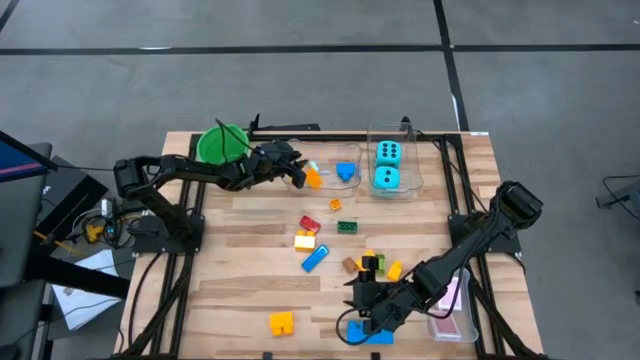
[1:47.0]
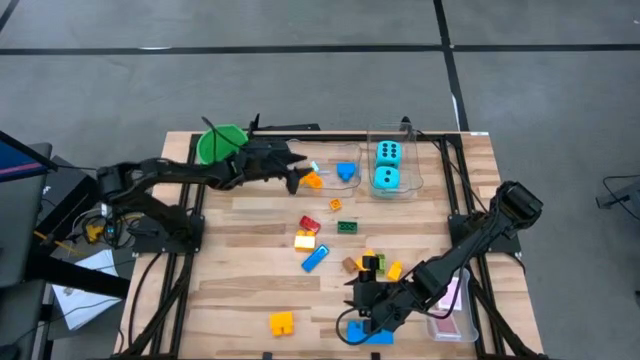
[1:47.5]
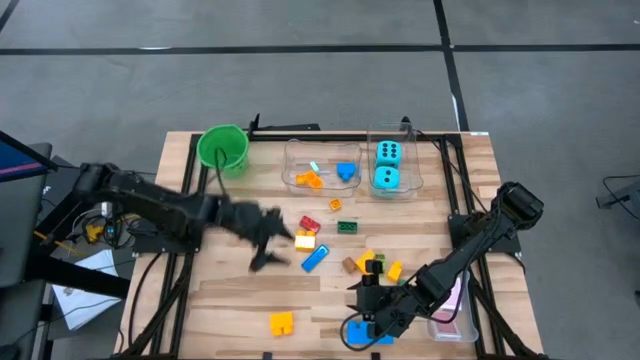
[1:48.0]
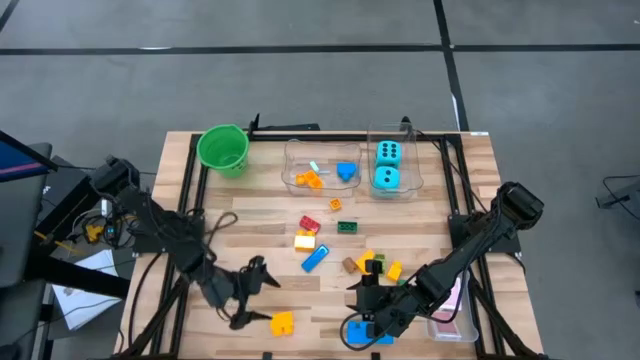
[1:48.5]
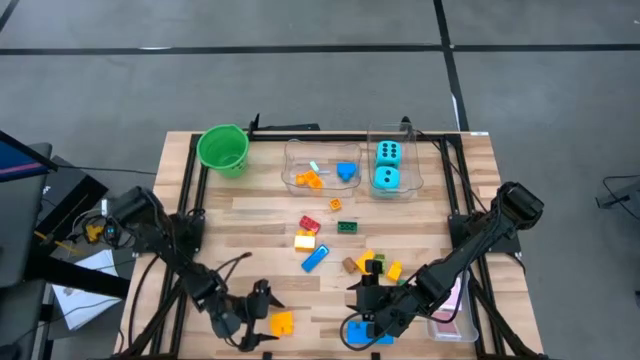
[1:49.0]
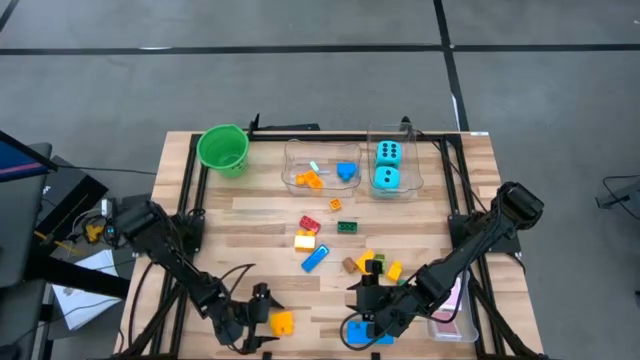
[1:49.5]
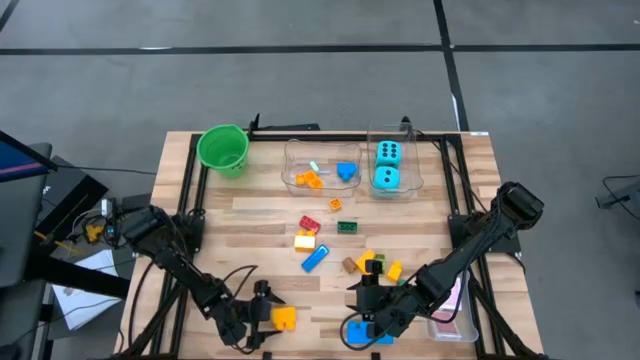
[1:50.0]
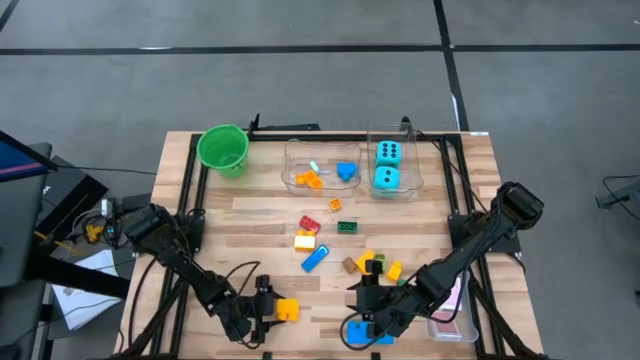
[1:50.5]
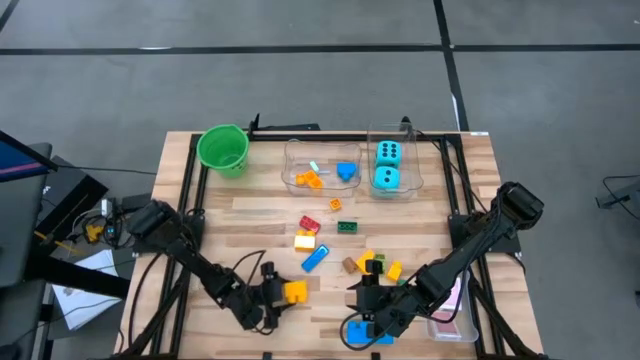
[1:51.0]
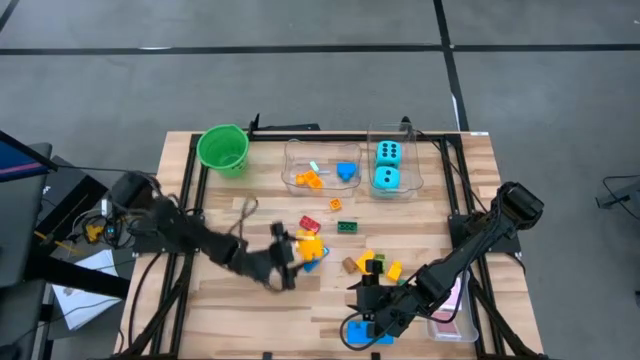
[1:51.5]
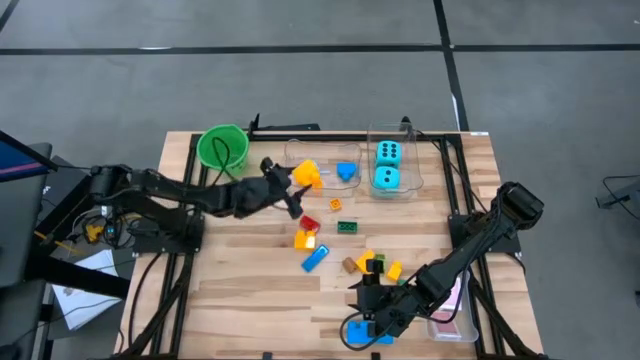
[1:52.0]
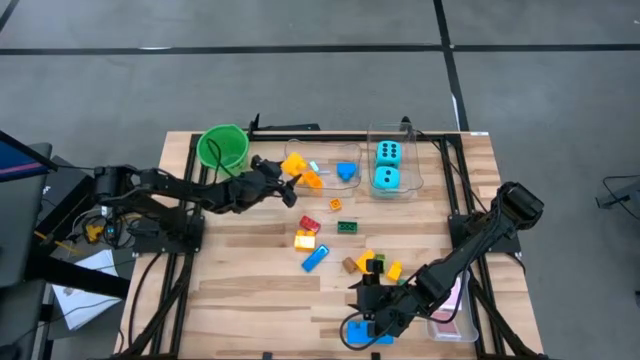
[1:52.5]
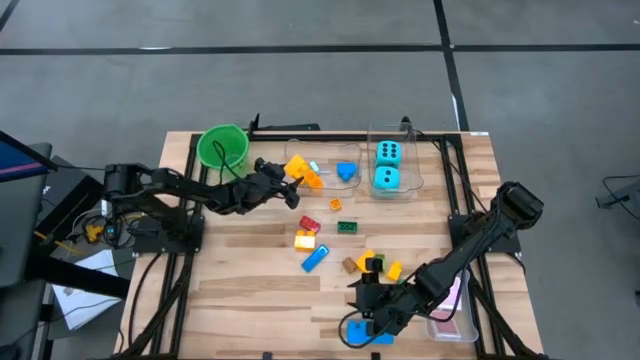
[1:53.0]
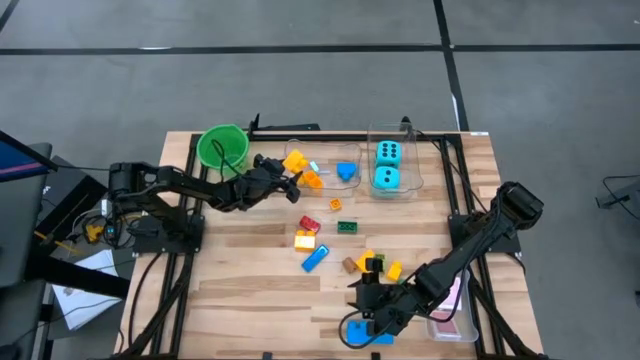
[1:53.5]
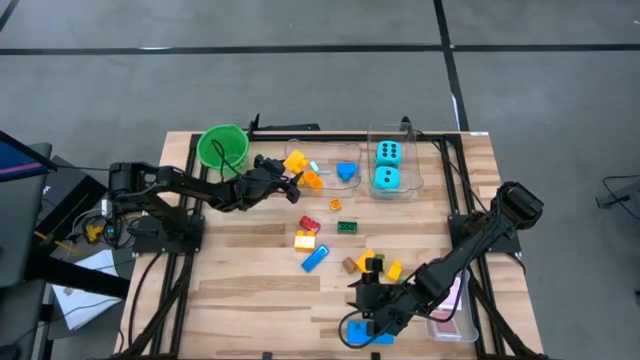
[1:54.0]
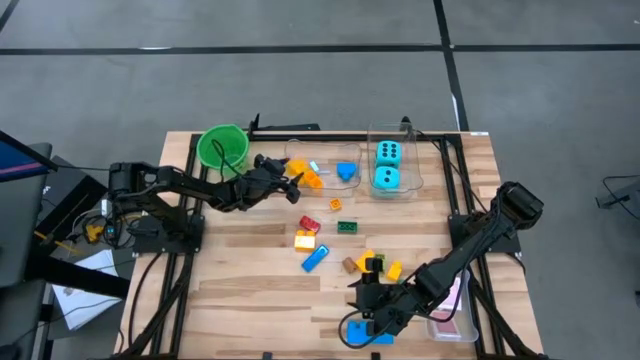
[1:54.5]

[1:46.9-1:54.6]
Task: Pick & Place Toys
Put the yellow gamepiece into the left transparent bin

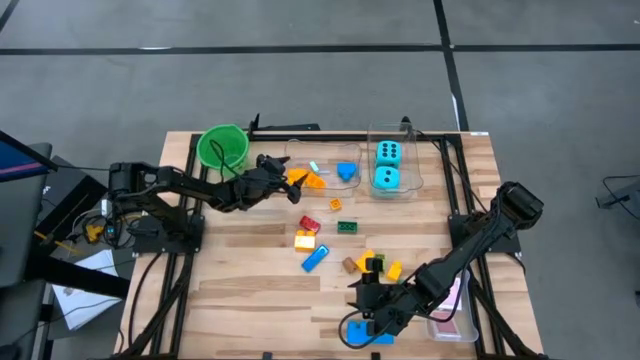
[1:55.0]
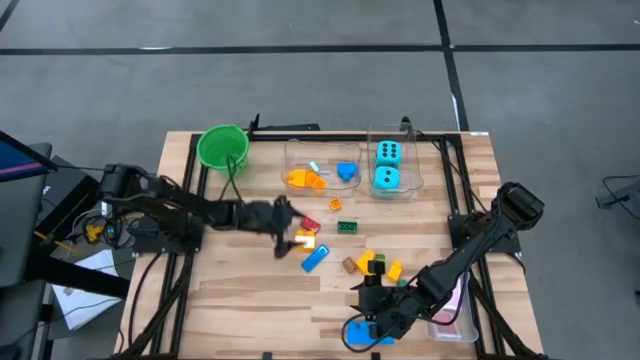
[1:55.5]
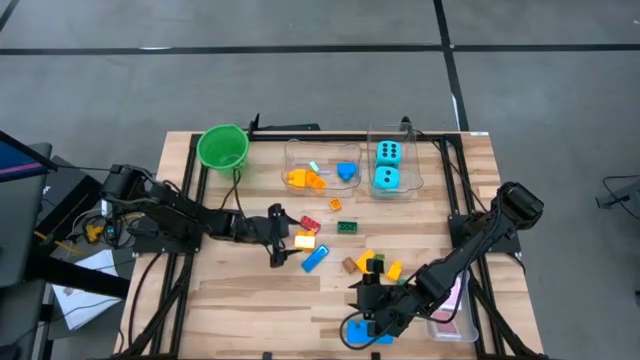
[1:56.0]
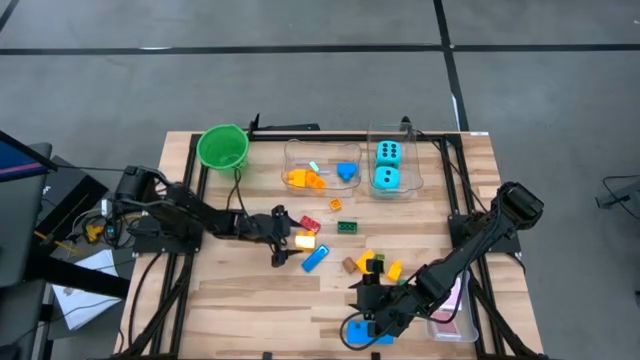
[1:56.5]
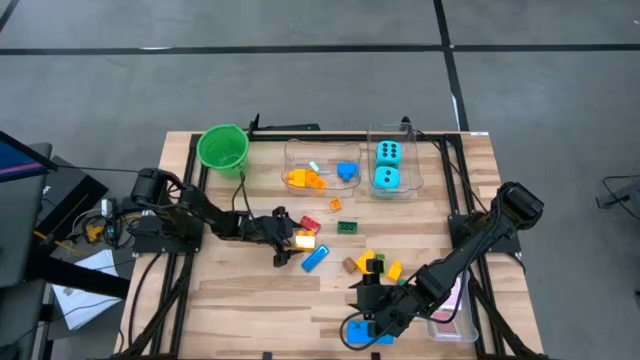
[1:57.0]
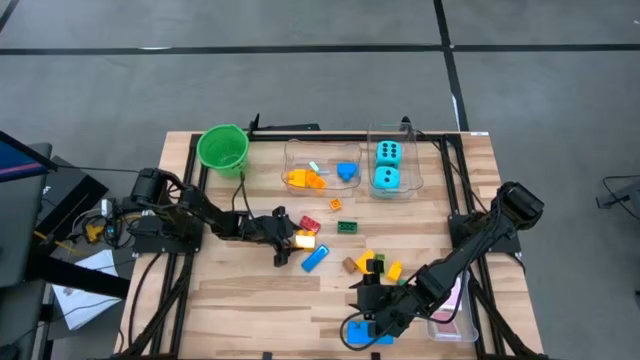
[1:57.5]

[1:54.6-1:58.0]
Put the yellow gamepiece into the left transparent bin

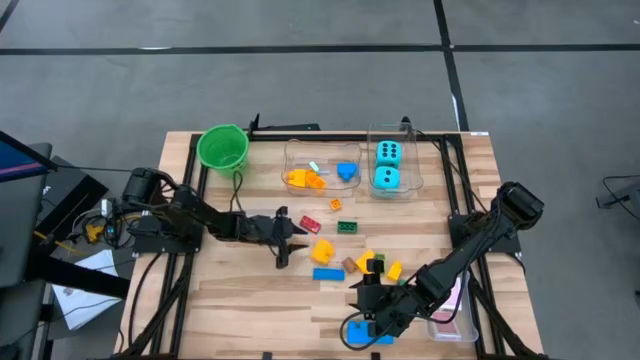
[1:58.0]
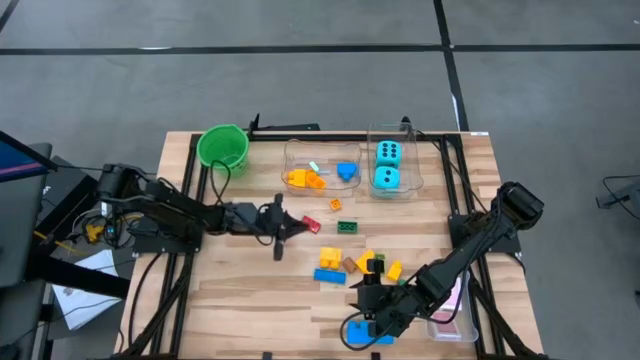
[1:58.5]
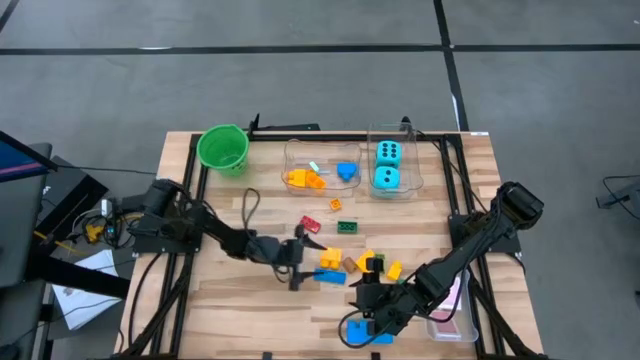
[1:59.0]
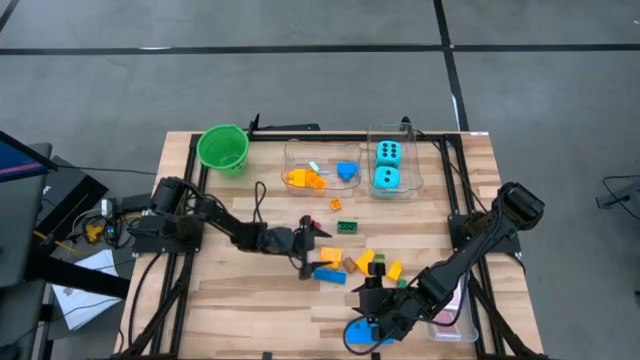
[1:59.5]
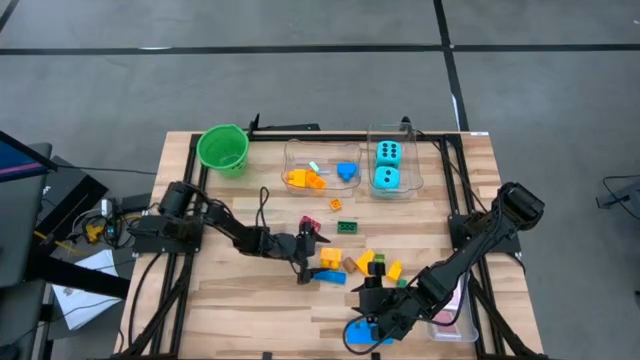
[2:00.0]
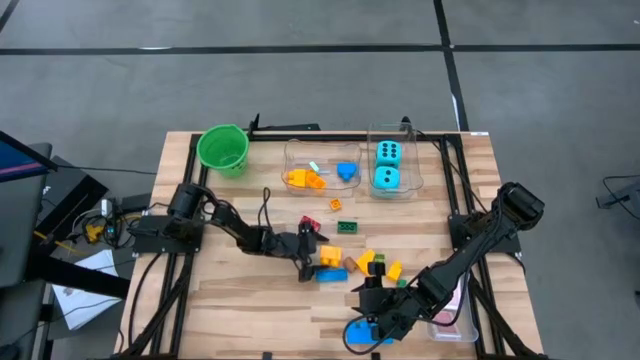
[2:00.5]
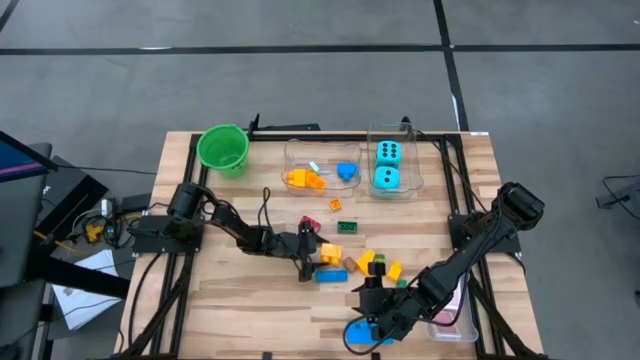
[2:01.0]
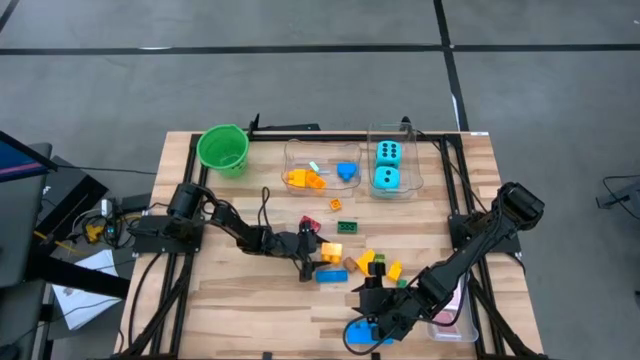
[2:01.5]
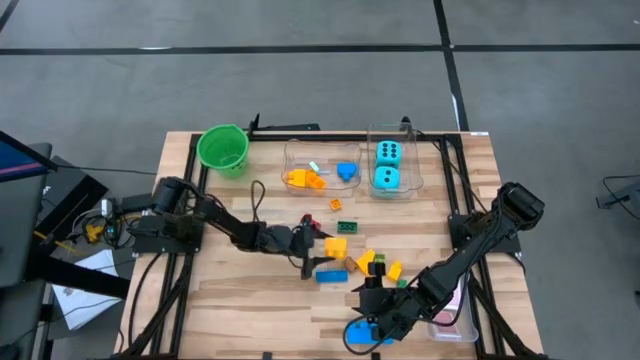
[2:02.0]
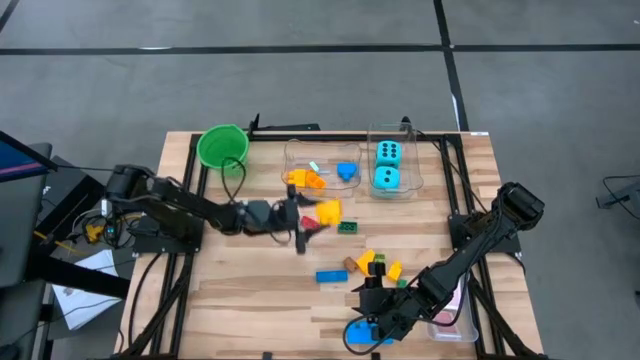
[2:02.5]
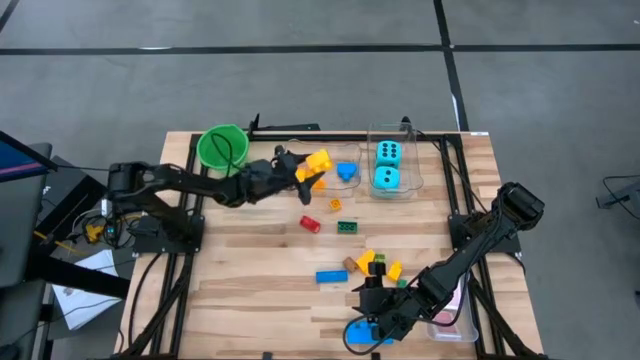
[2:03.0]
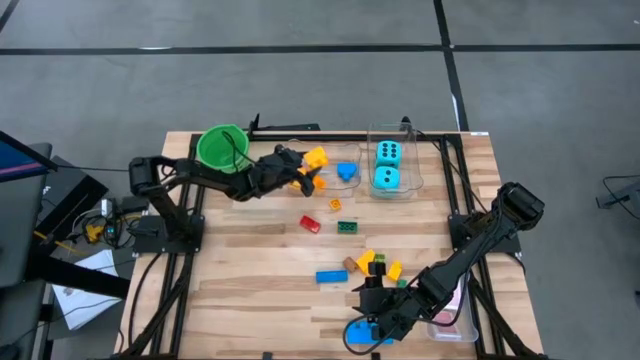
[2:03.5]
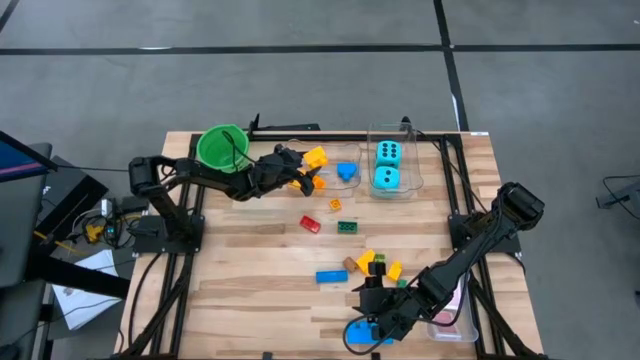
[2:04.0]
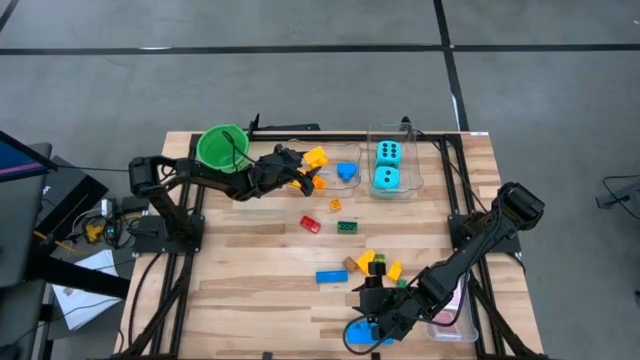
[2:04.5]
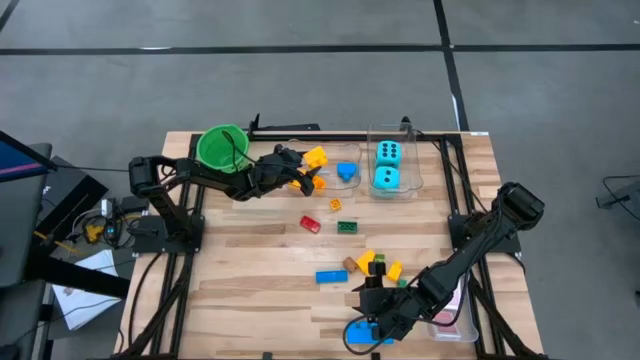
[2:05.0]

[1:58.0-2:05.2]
Put the yellow gamepiece into the left transparent bin

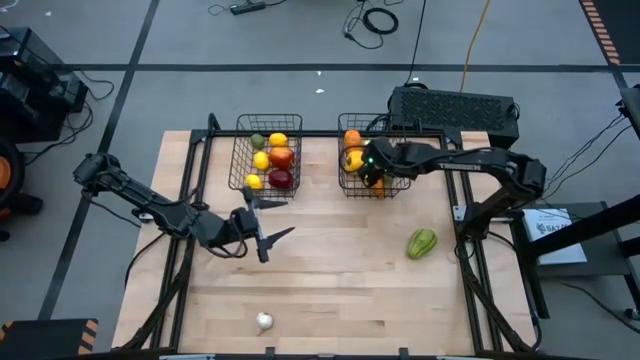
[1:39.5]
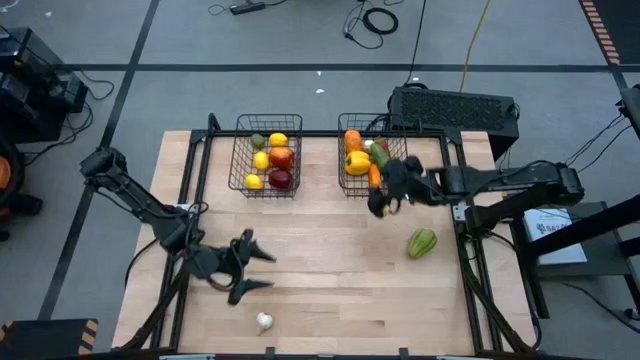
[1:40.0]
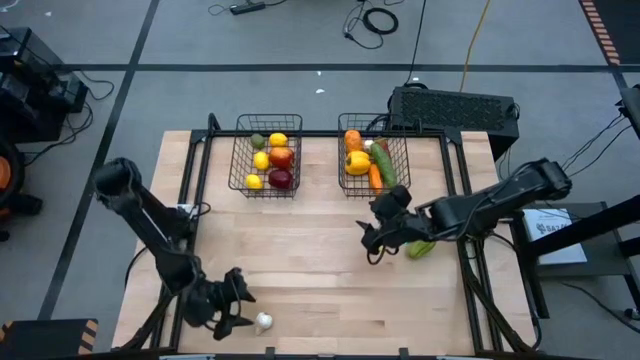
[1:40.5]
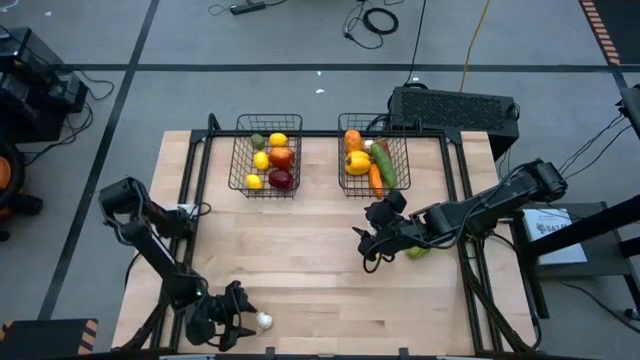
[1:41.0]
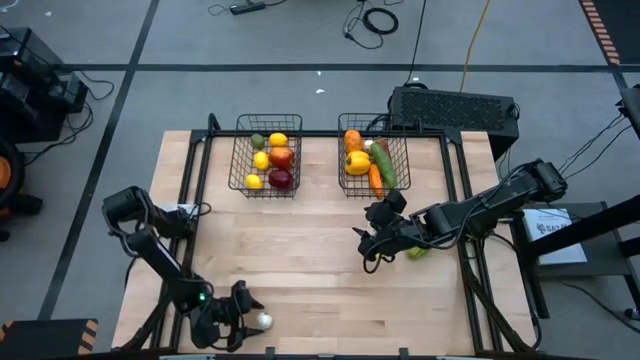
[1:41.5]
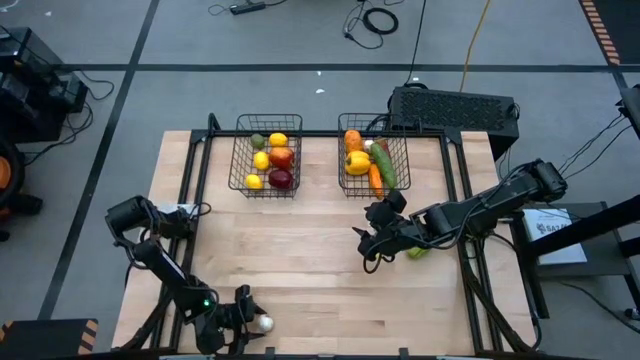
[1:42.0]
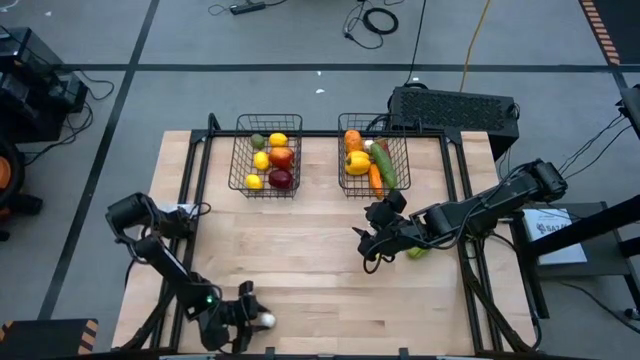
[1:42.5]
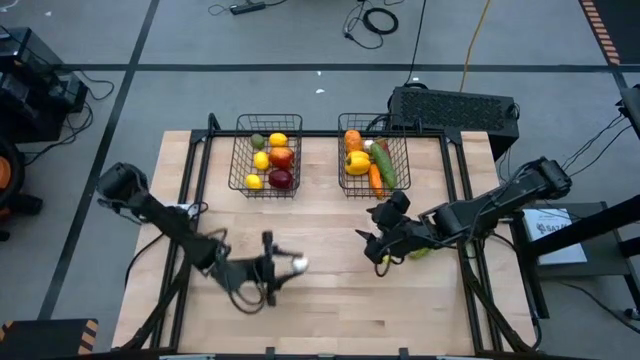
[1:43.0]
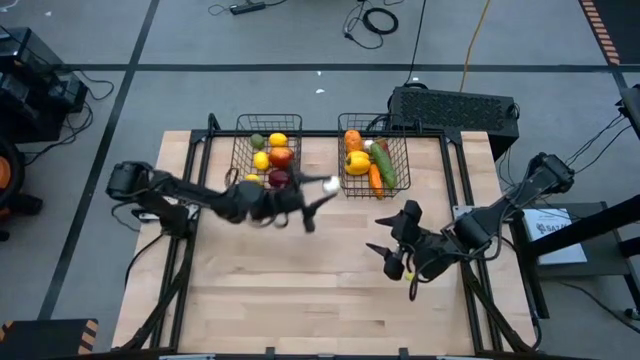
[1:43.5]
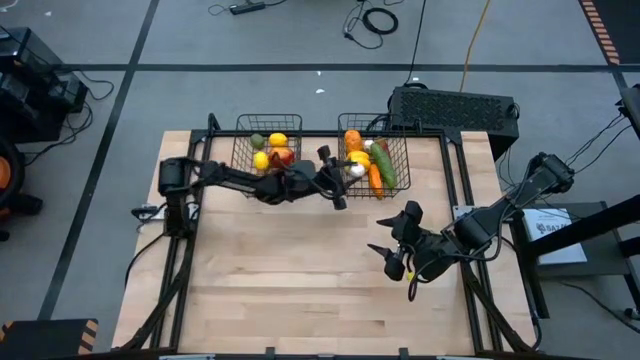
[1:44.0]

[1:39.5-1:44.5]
Task: Sort produce into baskets
Put the white garlic into the right mesh basket
